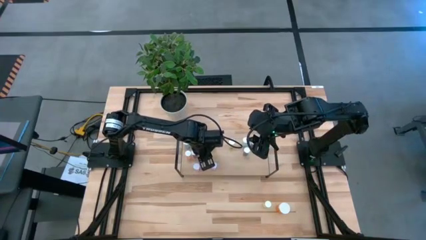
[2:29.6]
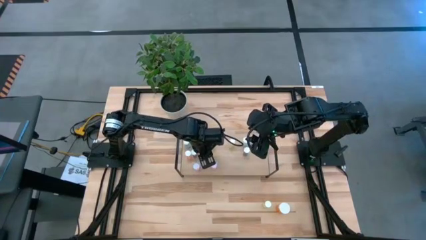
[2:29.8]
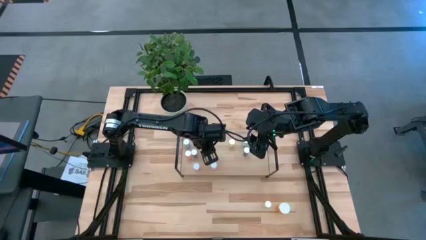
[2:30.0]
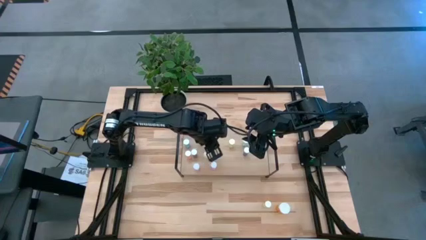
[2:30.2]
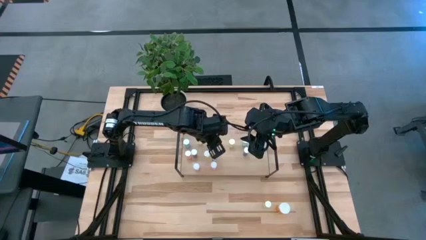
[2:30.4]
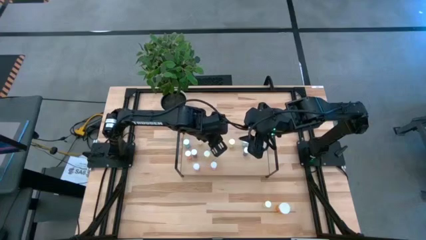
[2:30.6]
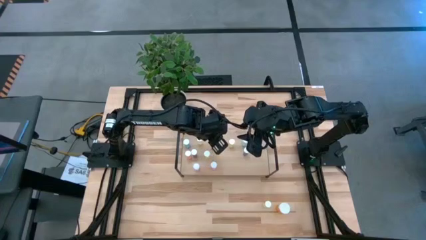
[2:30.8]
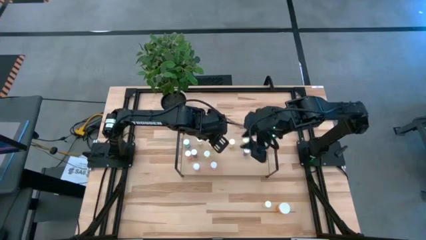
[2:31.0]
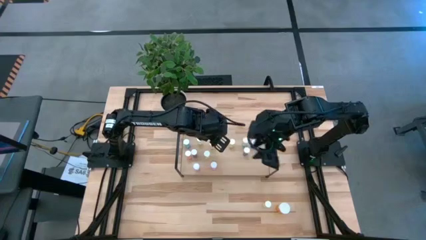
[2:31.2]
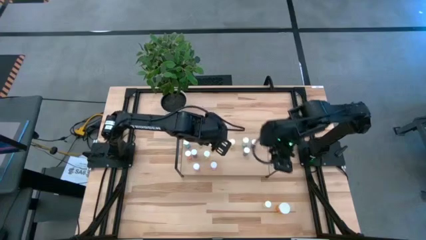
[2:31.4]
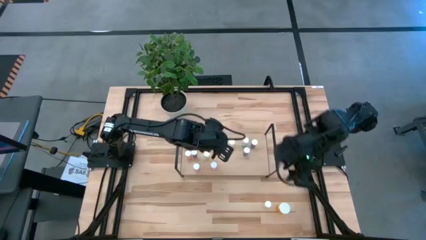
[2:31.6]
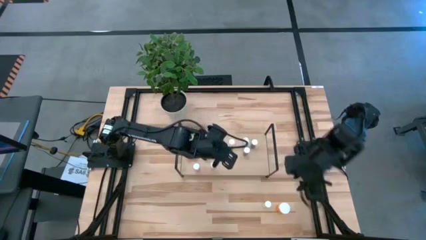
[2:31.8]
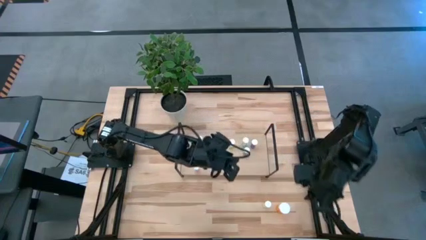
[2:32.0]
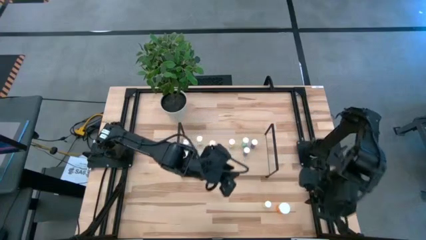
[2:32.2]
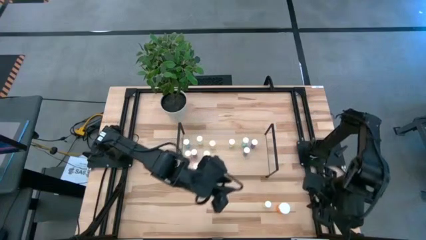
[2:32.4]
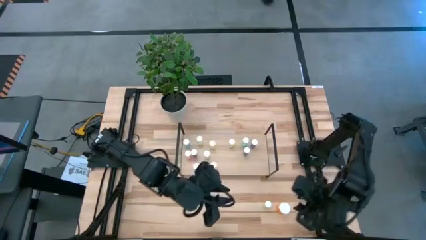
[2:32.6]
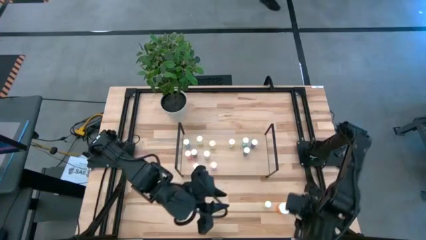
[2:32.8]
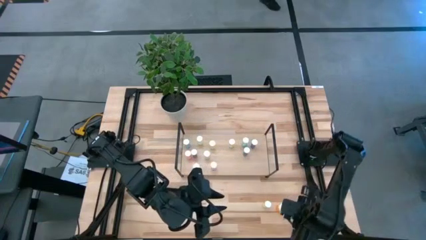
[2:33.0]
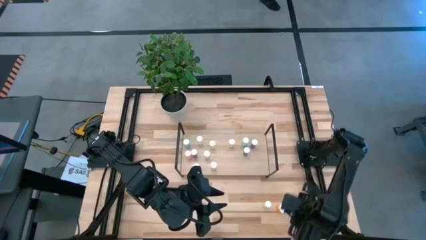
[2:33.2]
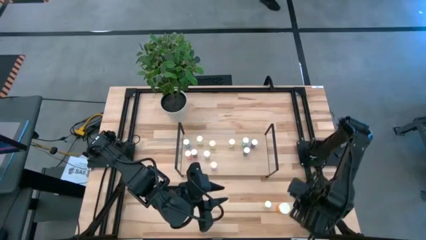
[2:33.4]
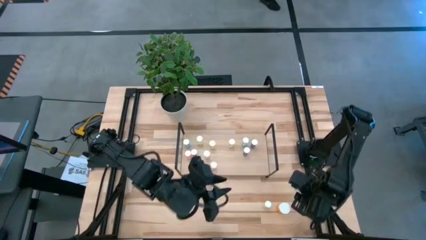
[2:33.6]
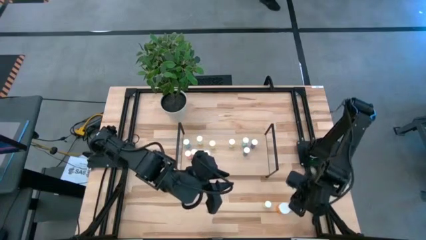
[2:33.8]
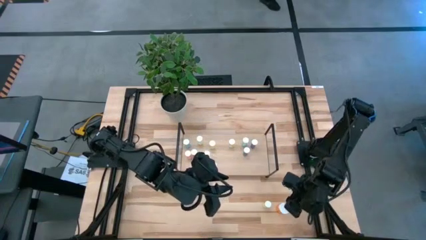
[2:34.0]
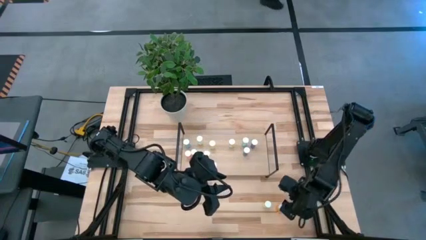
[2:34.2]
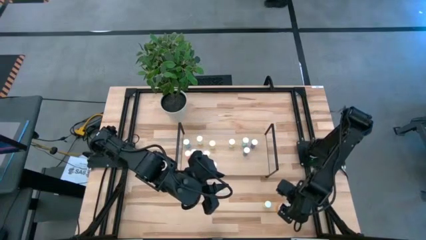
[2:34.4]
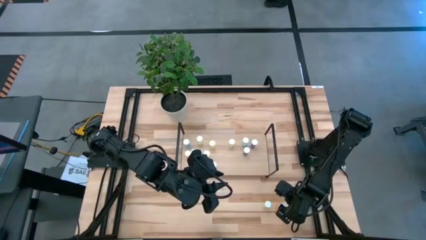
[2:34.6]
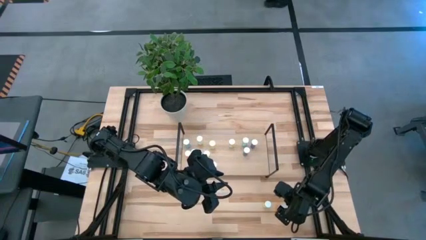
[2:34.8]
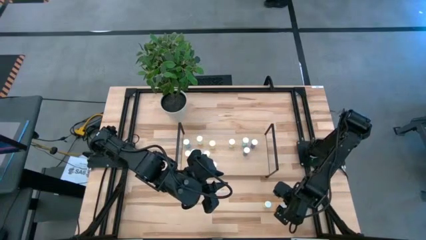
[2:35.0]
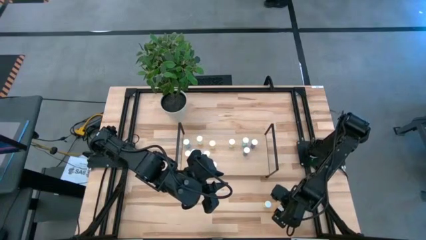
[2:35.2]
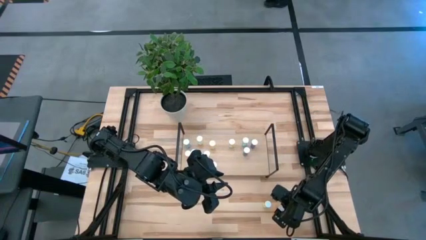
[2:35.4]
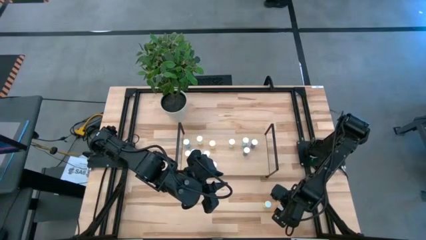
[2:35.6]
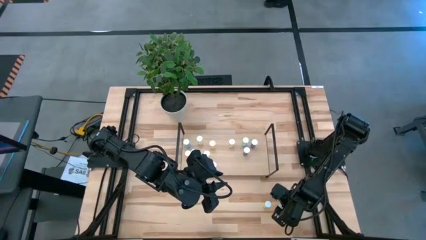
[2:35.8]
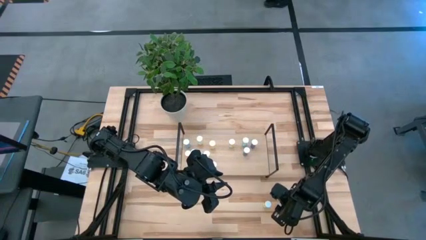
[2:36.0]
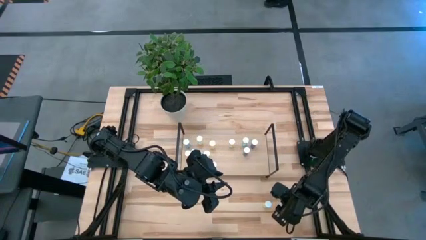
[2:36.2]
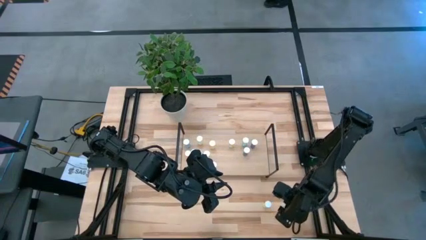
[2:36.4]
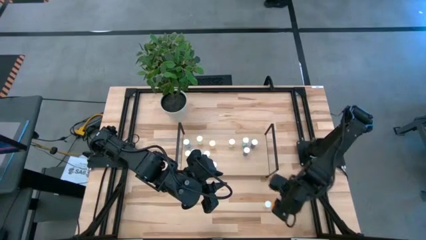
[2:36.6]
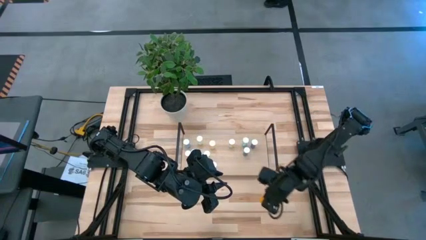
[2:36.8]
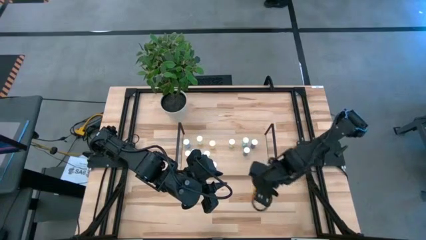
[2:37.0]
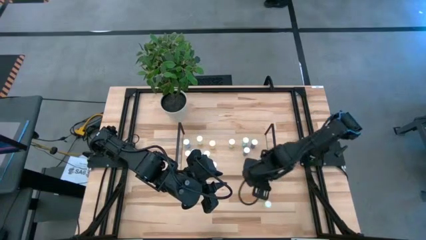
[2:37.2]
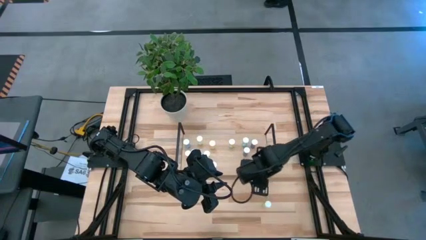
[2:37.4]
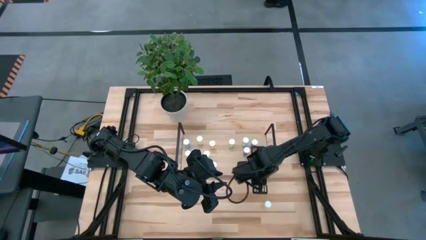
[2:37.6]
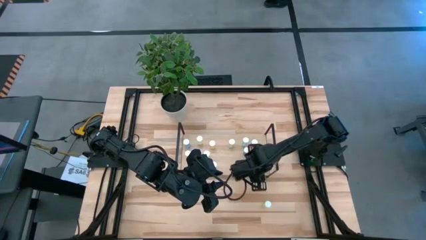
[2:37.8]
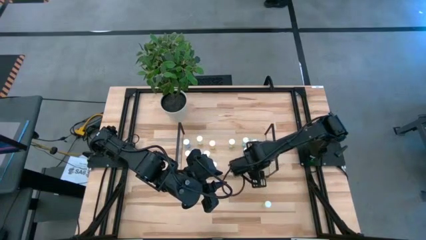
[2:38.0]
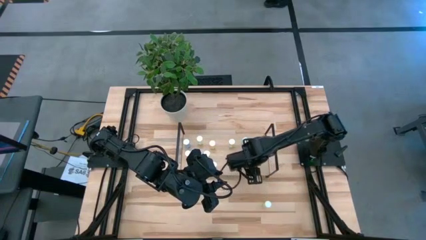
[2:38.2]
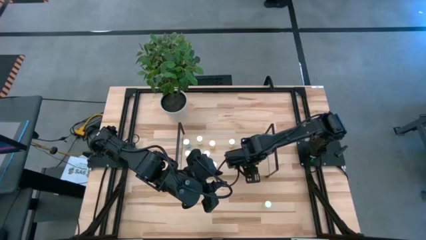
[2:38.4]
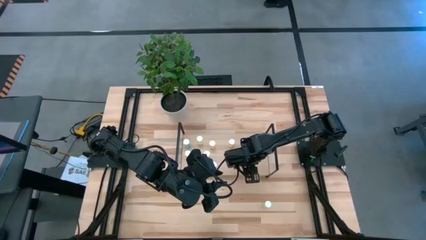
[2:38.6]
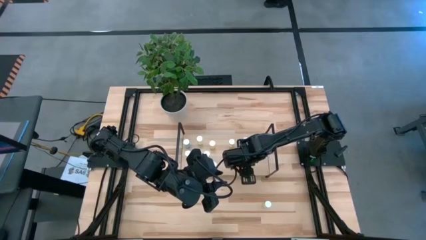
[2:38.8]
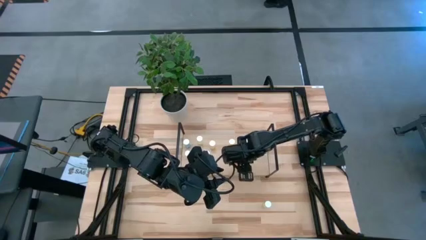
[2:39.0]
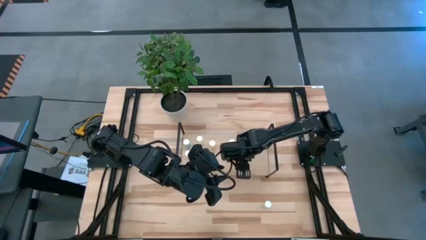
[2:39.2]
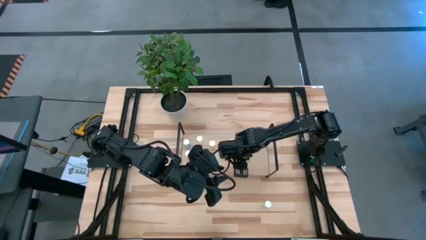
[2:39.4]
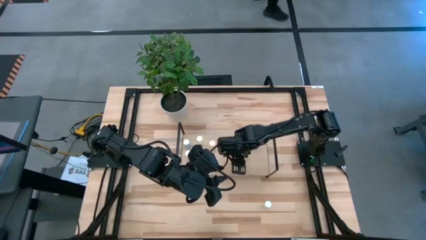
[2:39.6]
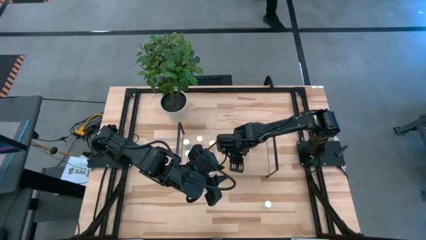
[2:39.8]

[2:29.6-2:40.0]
Task: Pick and place medicine bottles onto shelf by color
Put the orange pill bottle on the shelf

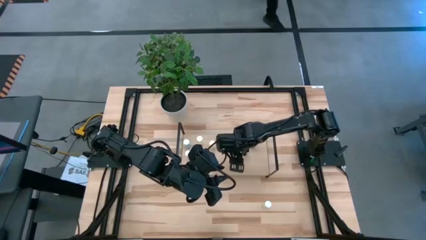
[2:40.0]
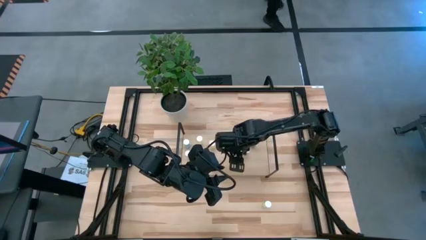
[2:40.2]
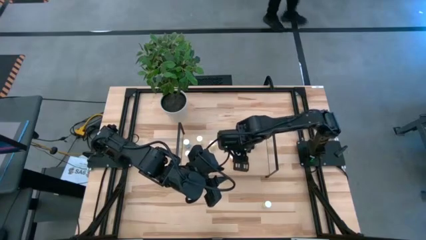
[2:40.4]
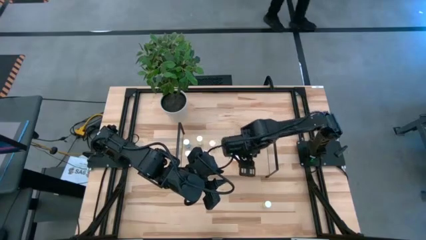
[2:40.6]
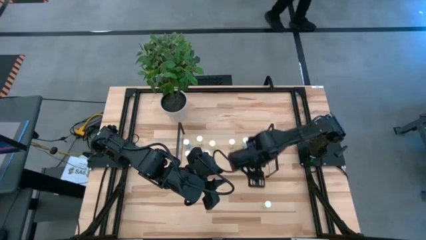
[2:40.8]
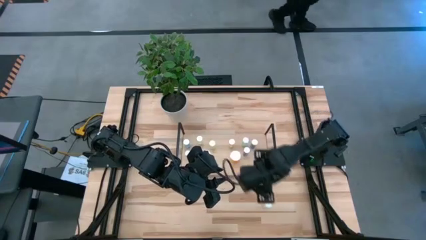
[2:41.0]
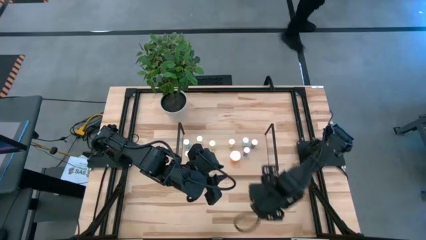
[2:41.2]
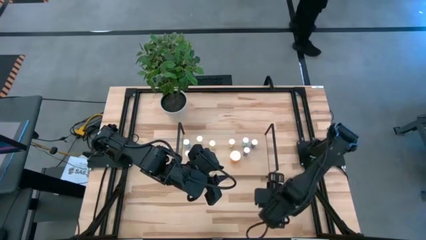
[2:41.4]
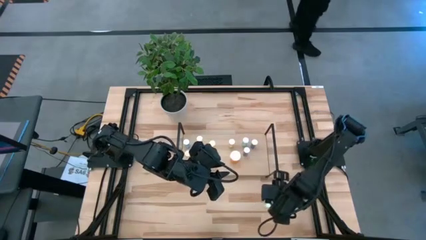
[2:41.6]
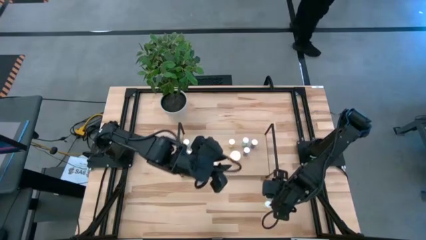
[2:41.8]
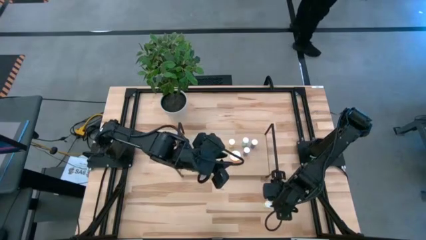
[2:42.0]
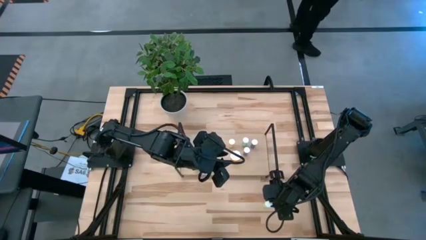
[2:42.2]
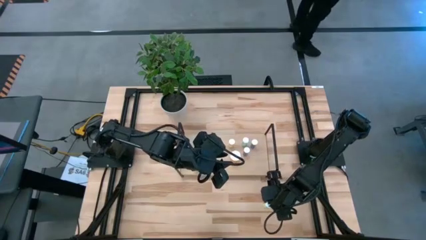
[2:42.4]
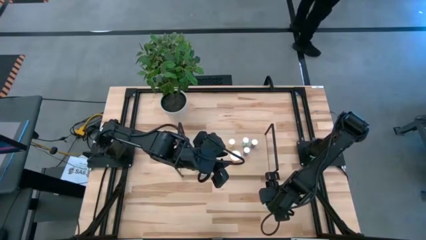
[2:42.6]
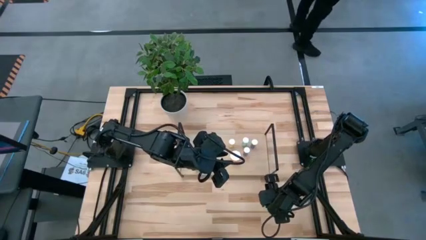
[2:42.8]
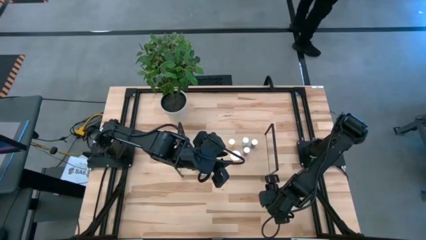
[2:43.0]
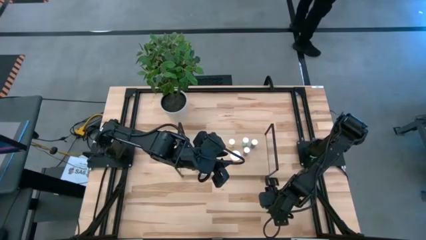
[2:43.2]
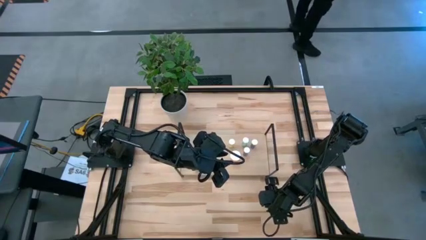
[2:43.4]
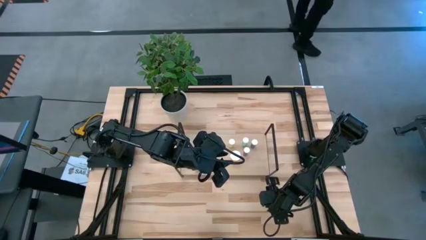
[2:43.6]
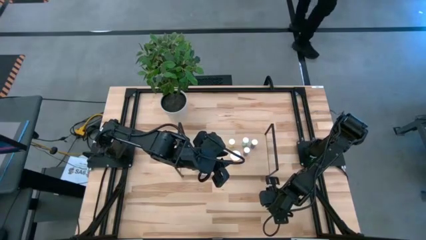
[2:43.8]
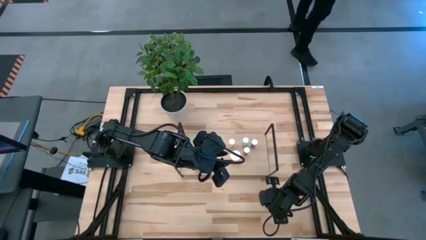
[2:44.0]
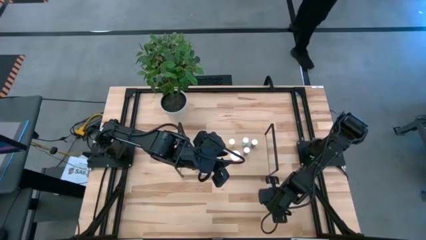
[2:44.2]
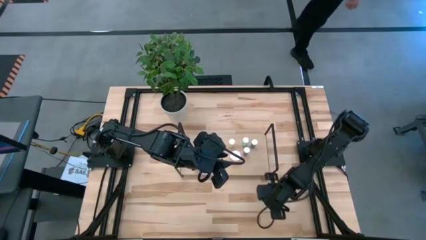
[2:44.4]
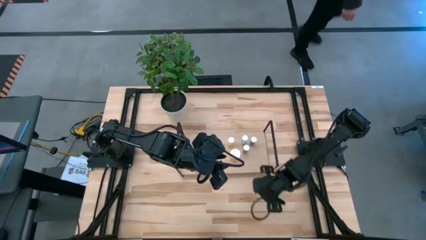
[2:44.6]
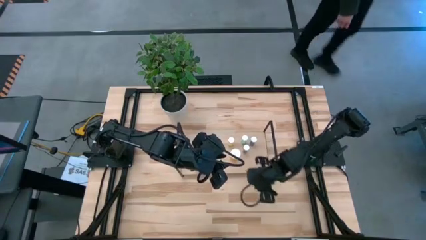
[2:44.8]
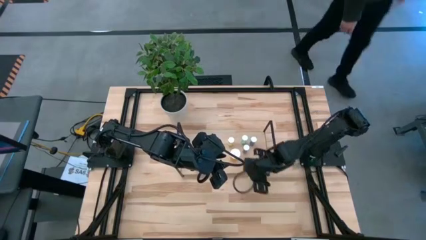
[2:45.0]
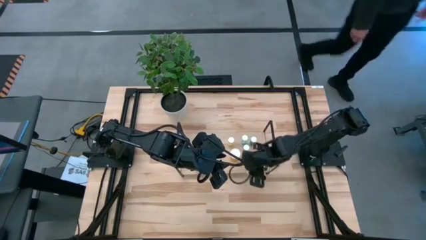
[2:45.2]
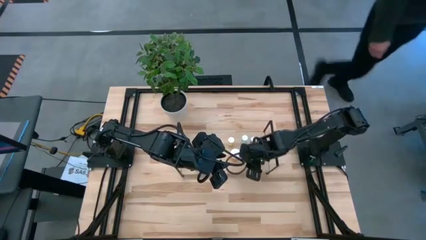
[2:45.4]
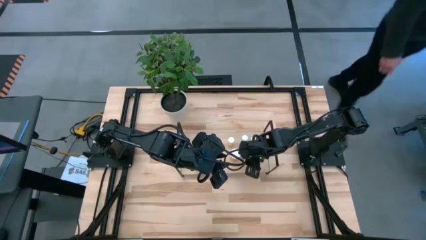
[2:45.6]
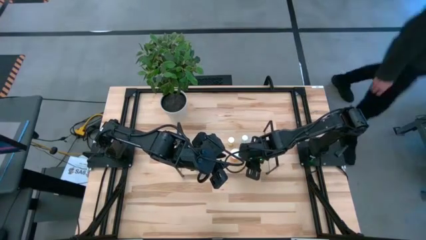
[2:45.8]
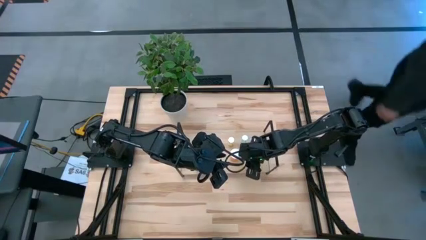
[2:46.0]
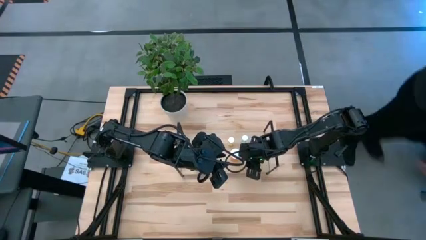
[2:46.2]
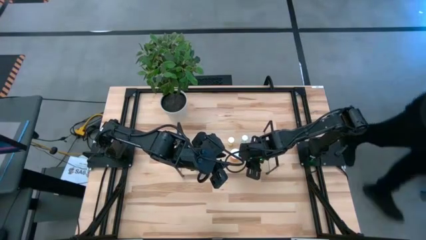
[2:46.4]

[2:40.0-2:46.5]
Put the yellow pill bottle on the shelf
